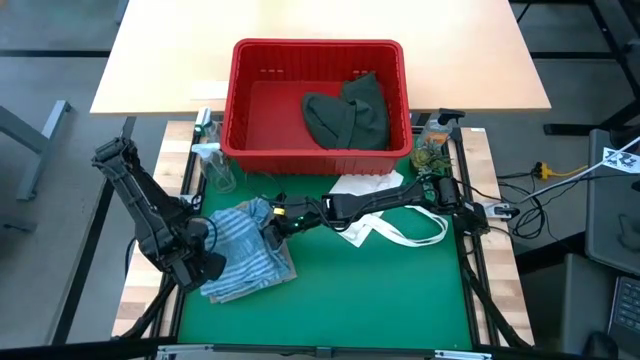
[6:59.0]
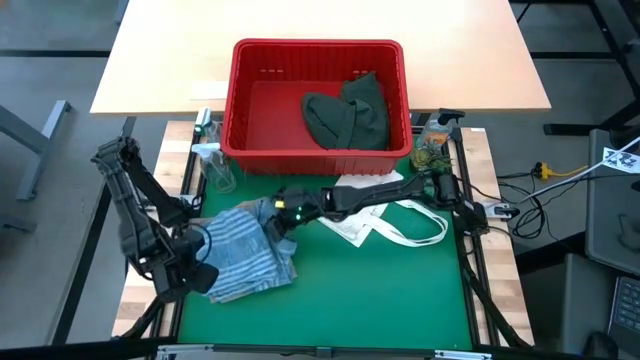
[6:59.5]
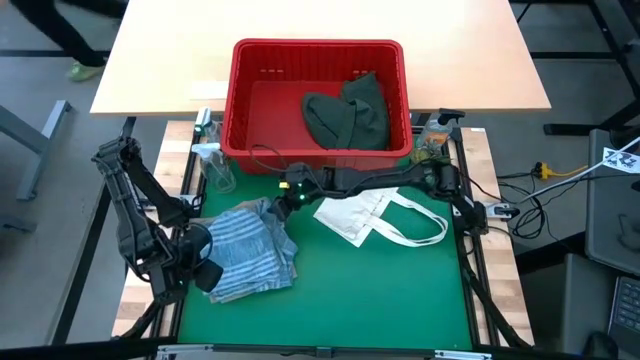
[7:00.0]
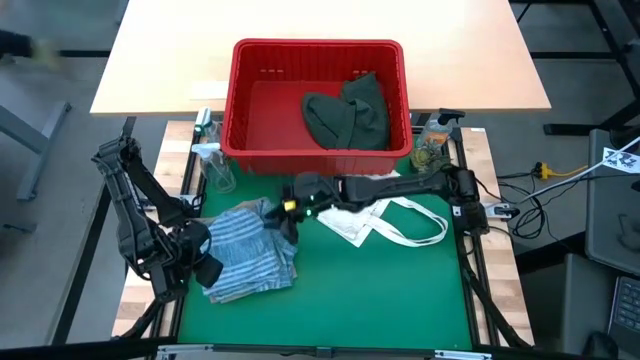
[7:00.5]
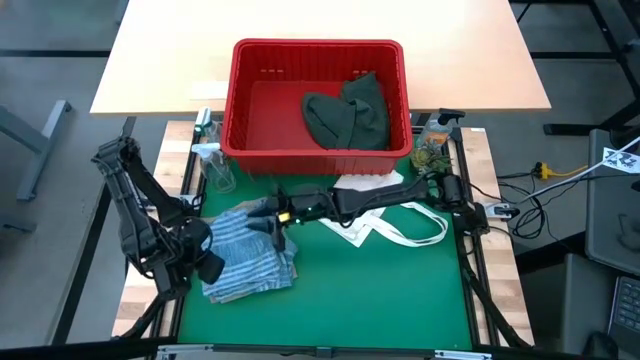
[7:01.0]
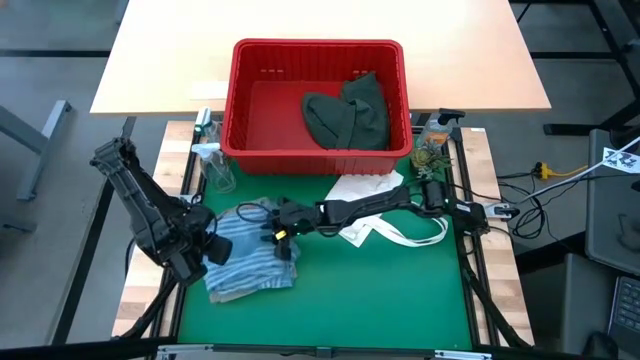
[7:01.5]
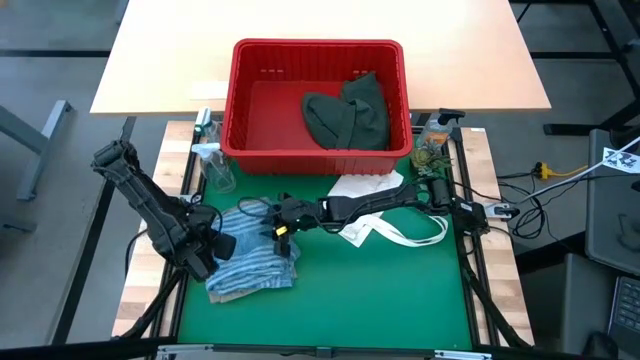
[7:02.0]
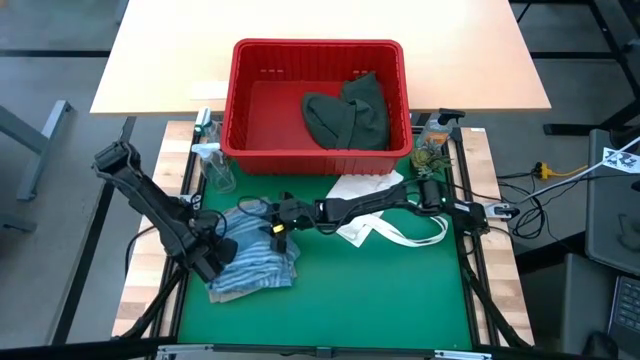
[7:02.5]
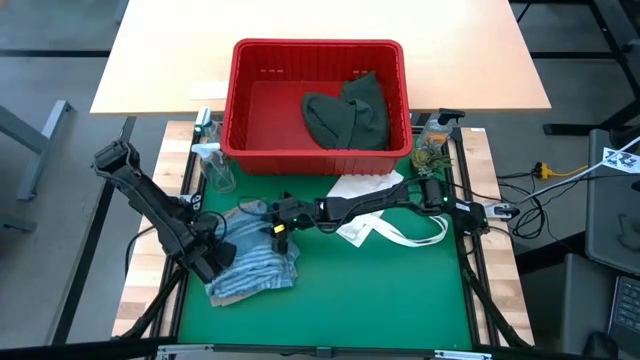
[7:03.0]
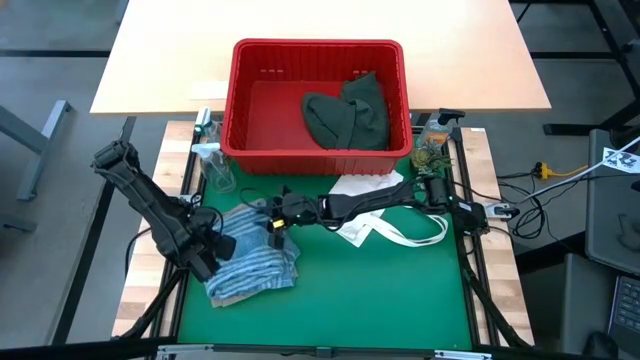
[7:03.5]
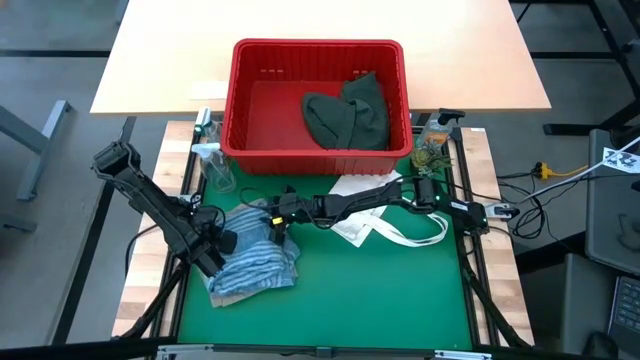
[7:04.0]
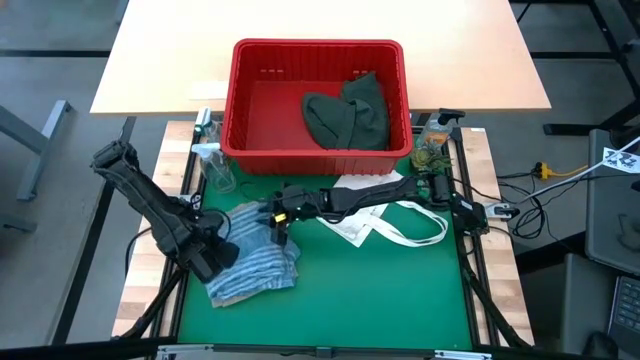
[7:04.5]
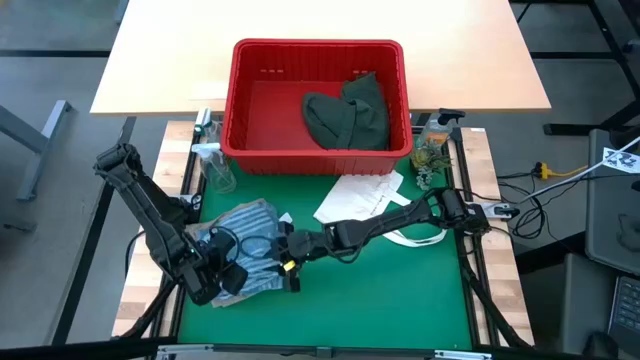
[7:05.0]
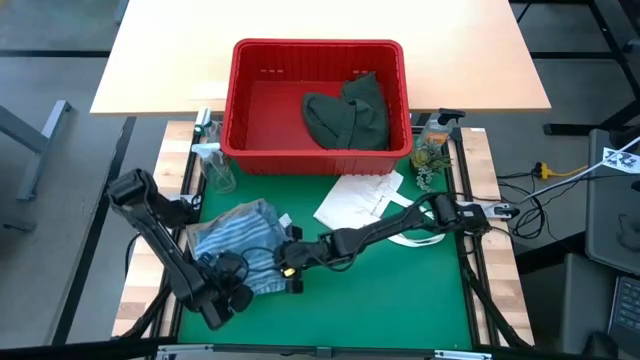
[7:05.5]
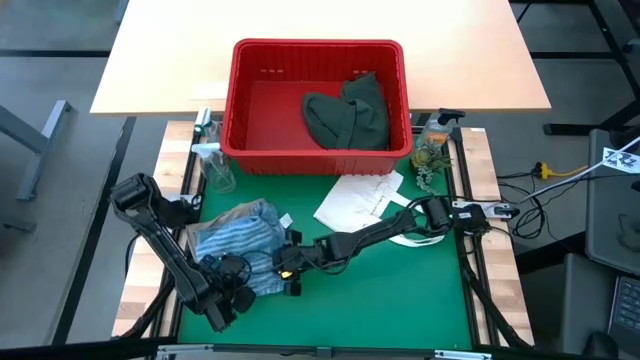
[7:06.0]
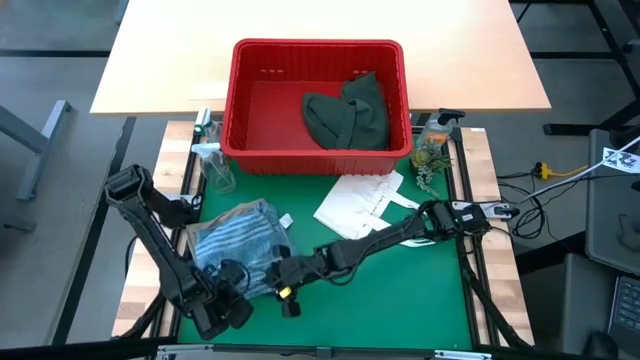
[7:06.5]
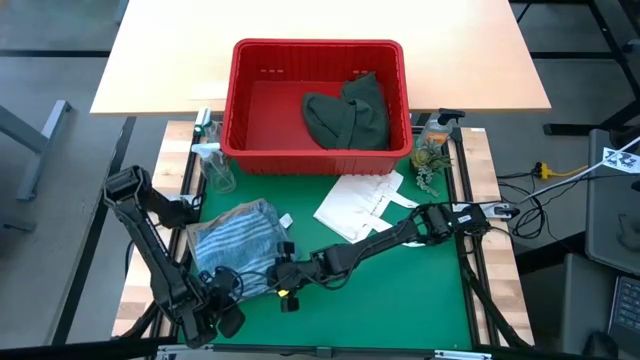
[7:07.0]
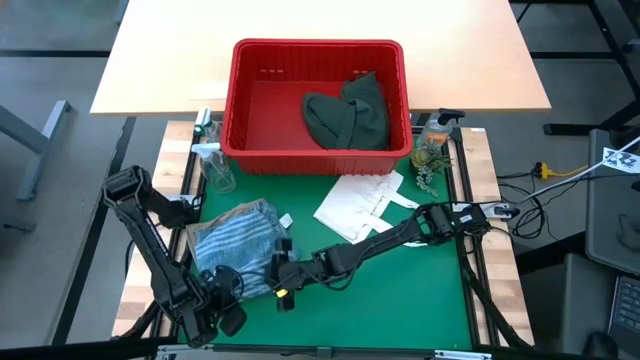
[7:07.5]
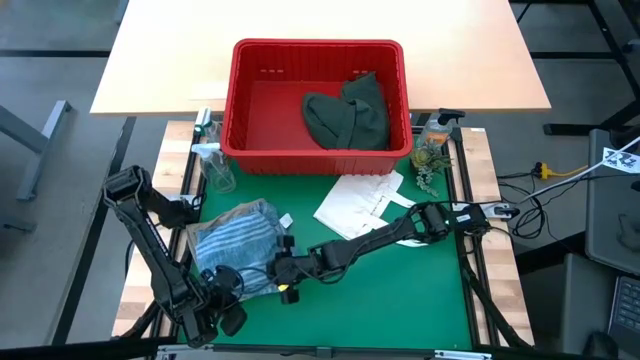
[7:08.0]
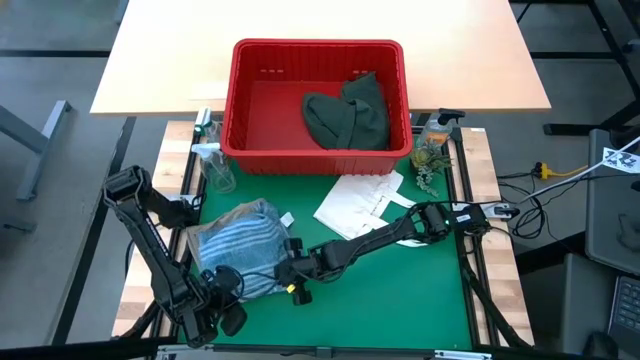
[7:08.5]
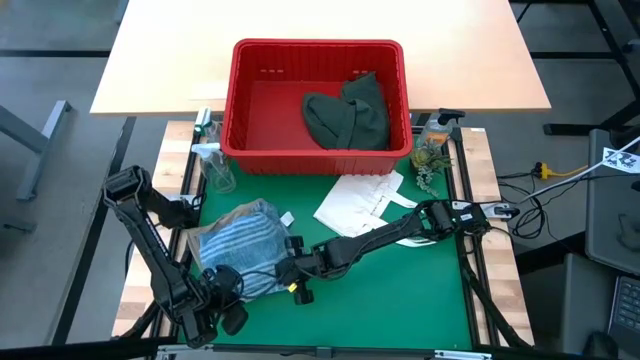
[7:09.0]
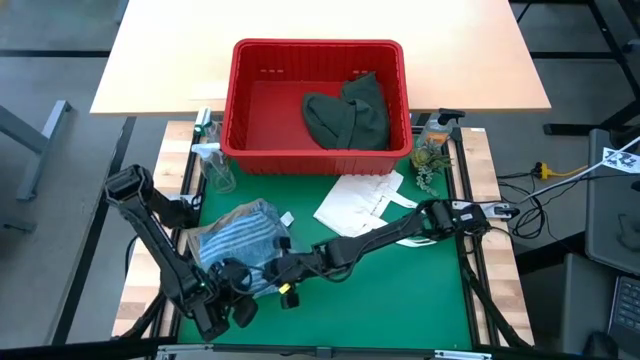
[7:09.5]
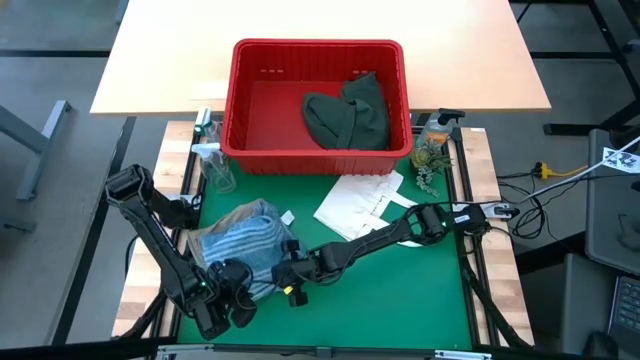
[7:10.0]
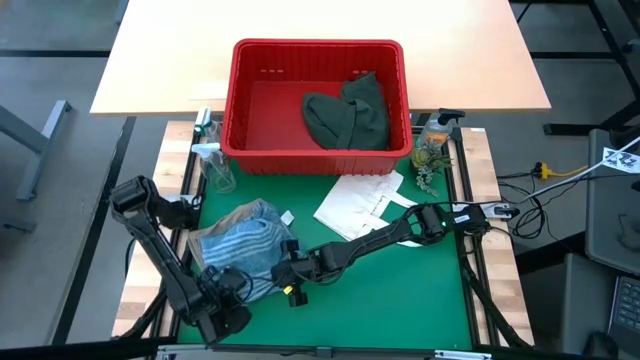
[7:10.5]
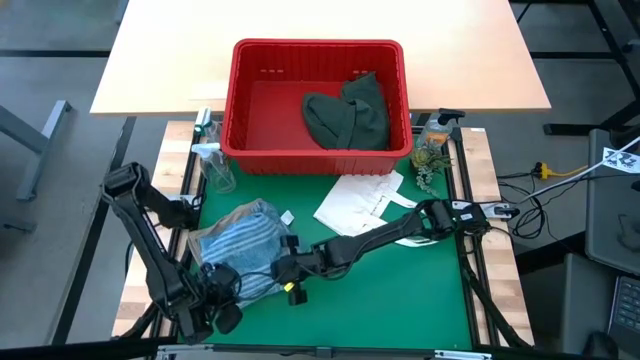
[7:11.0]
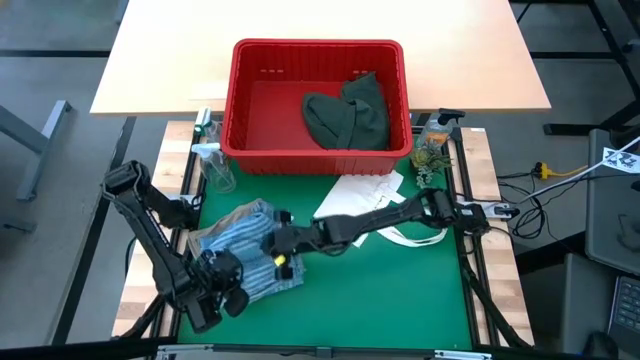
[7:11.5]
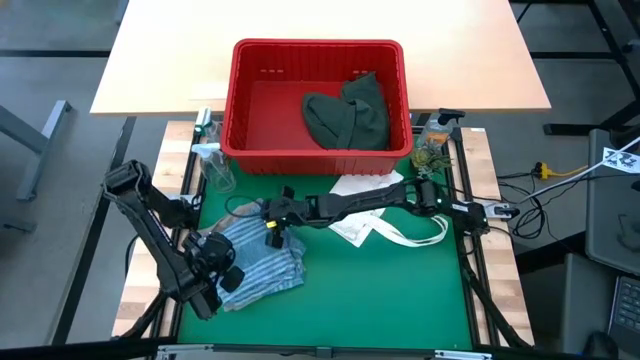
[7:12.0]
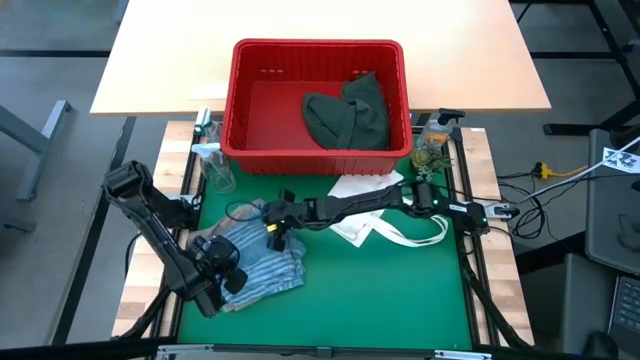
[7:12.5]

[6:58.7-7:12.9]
Task: Fold Laundry from Bin
Stack the folded blue polo shirt on top of the gray shorts

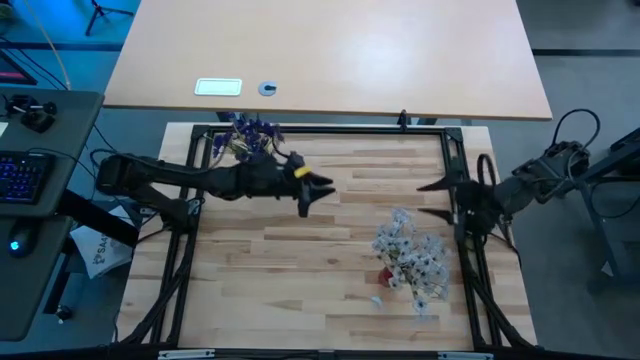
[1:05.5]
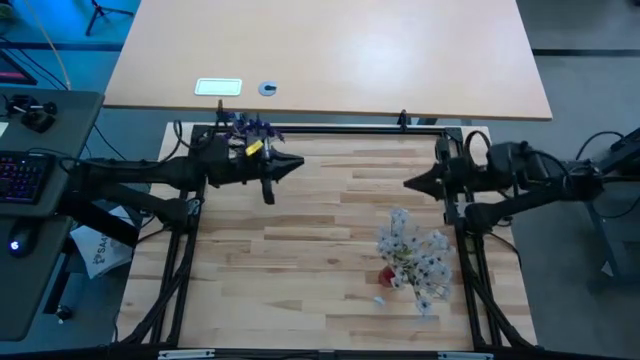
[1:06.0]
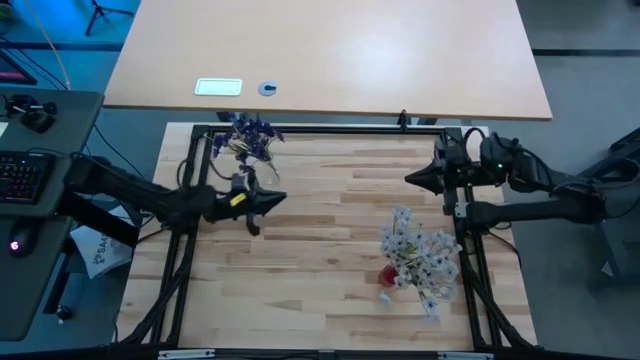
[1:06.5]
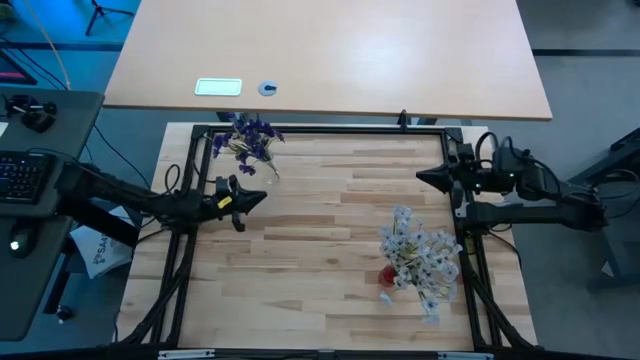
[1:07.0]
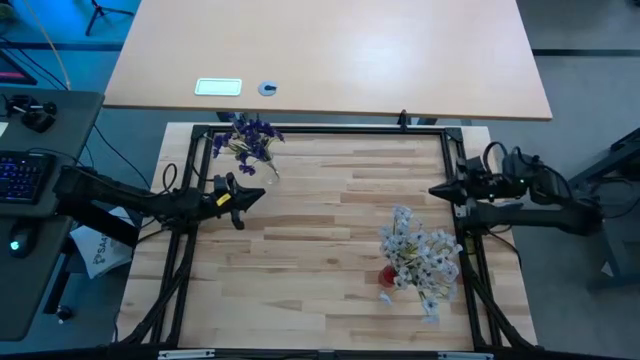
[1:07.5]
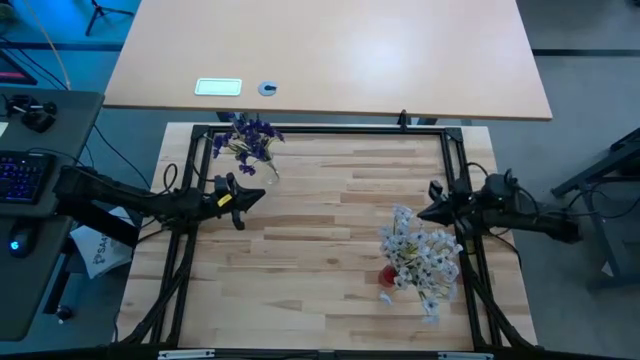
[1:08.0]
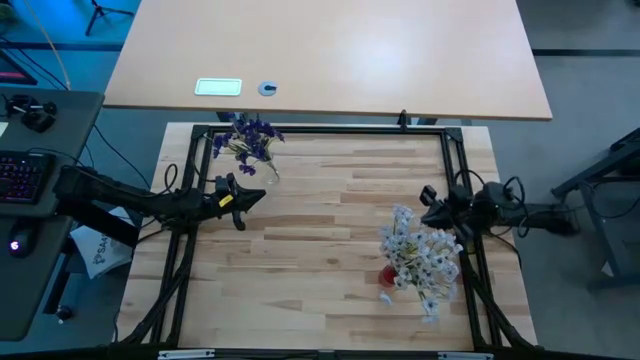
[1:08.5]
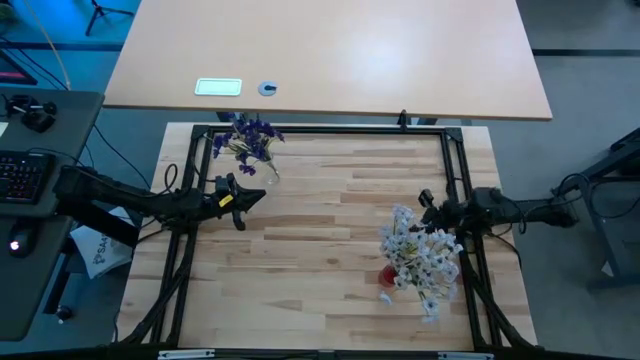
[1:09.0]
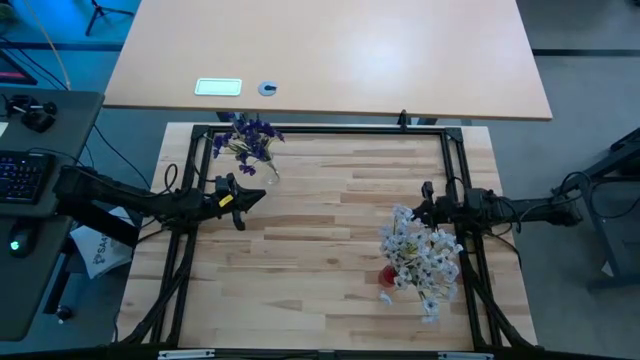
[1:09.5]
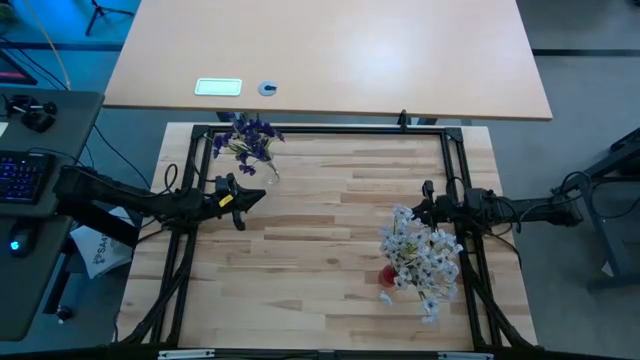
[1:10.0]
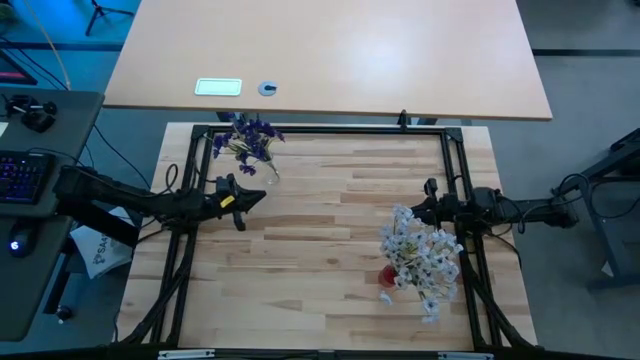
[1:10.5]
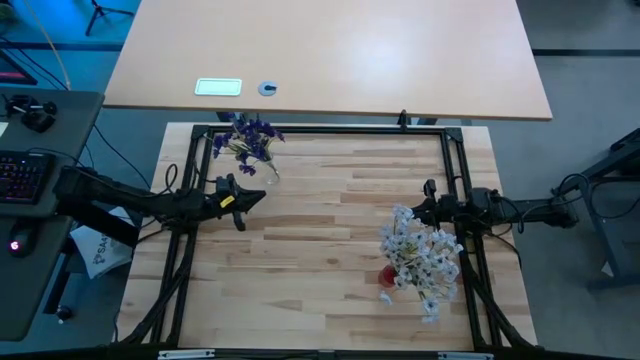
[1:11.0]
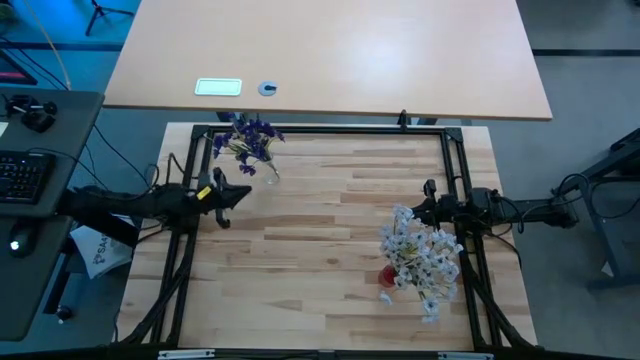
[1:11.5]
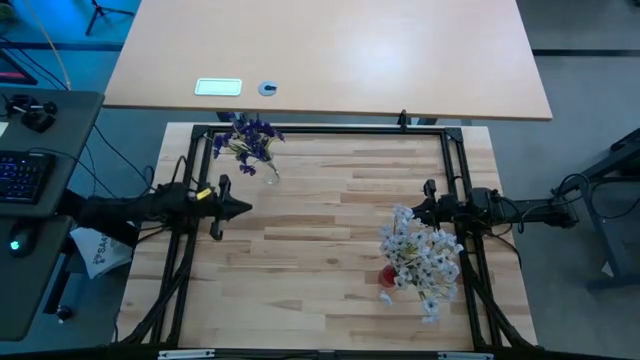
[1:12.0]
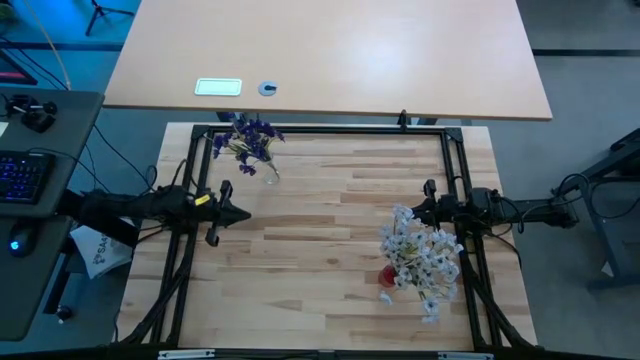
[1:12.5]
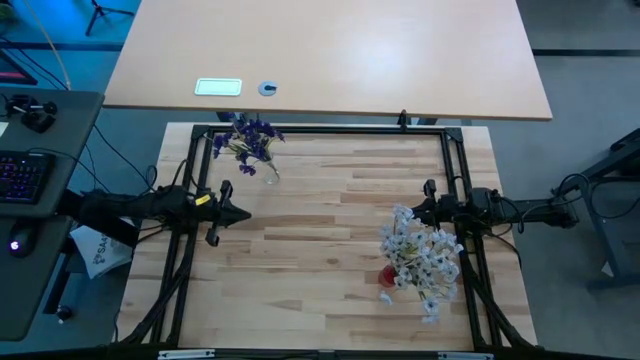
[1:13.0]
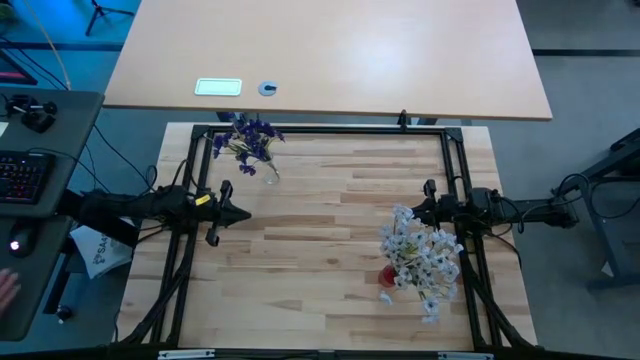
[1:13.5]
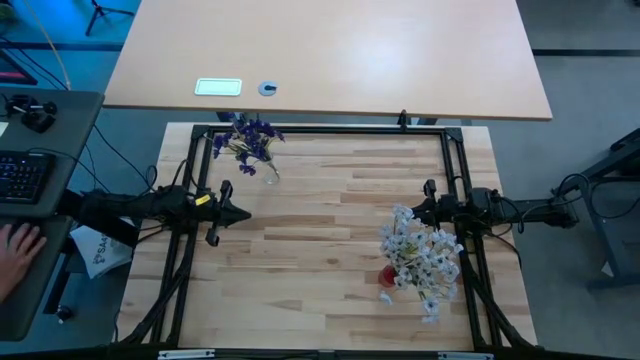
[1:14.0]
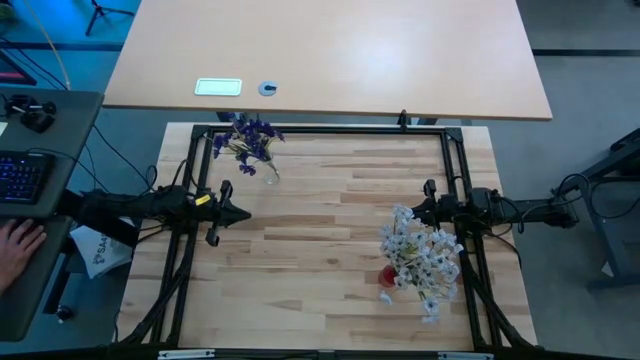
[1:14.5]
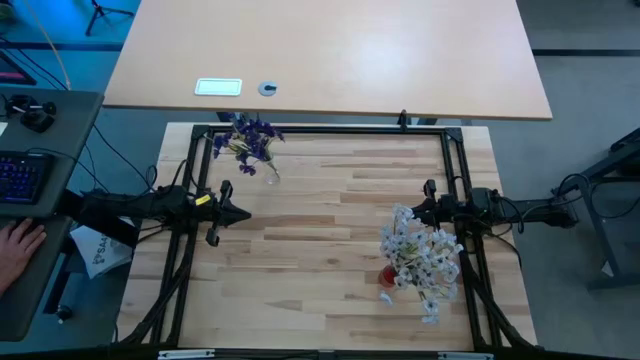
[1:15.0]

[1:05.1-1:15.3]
Task: Sort flowers into vase by color
Return to Home Position
